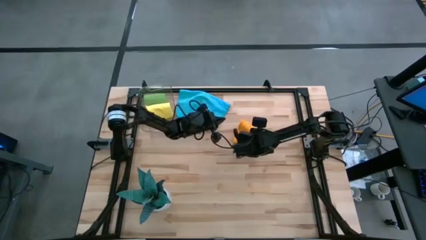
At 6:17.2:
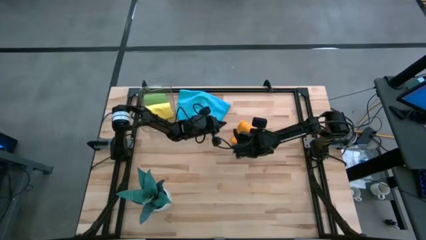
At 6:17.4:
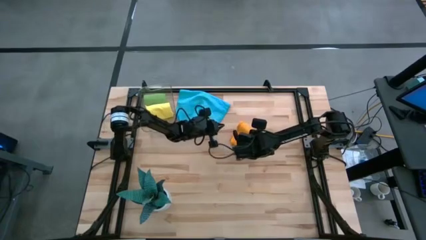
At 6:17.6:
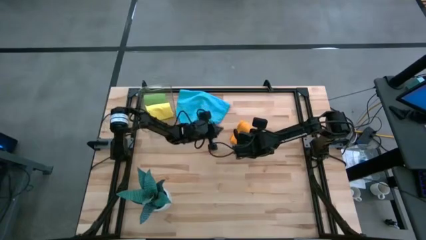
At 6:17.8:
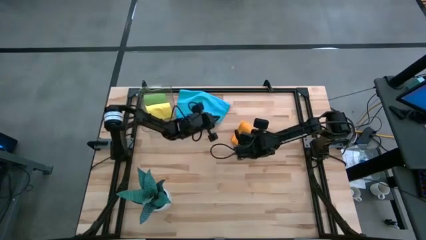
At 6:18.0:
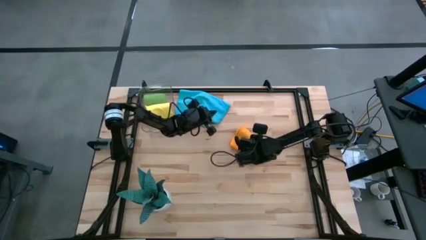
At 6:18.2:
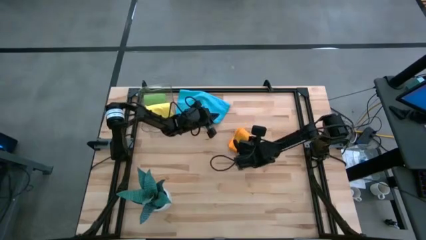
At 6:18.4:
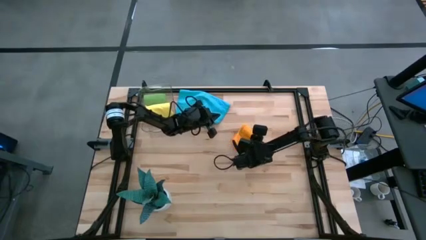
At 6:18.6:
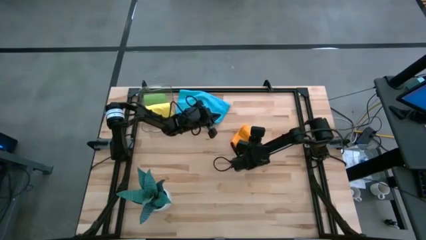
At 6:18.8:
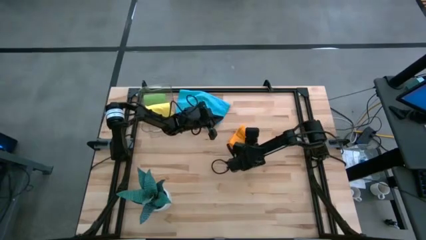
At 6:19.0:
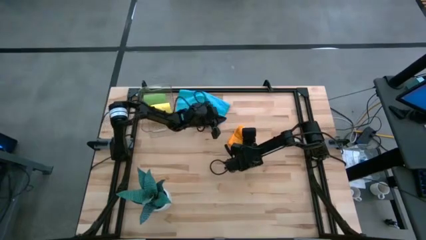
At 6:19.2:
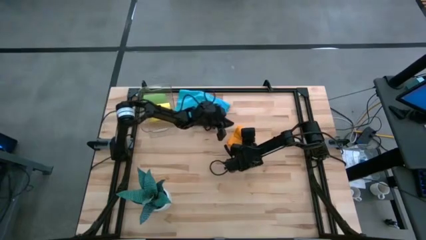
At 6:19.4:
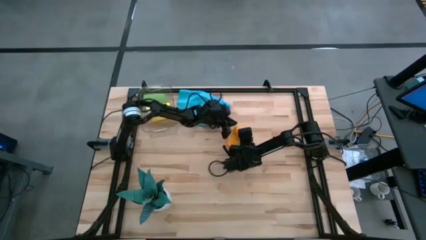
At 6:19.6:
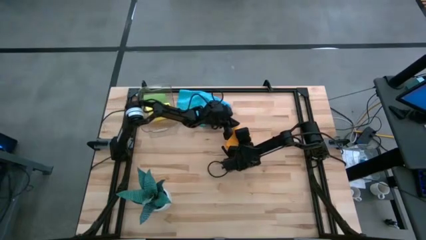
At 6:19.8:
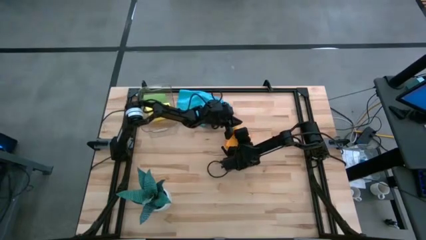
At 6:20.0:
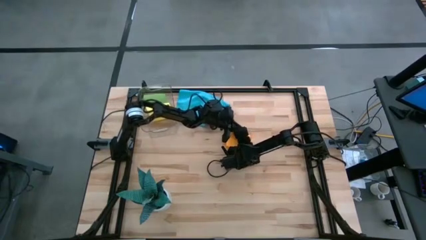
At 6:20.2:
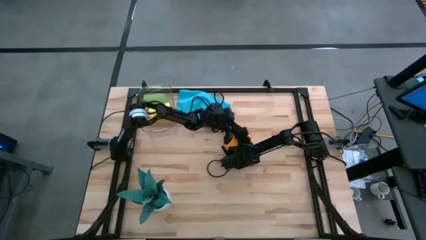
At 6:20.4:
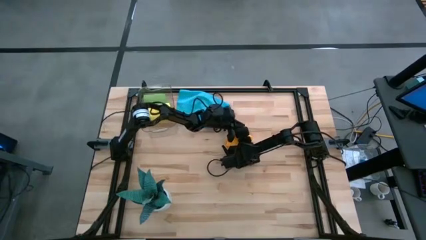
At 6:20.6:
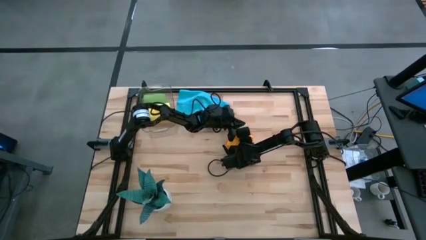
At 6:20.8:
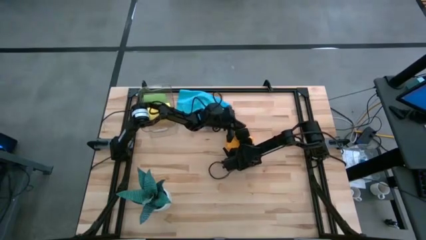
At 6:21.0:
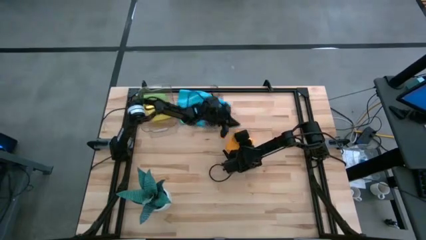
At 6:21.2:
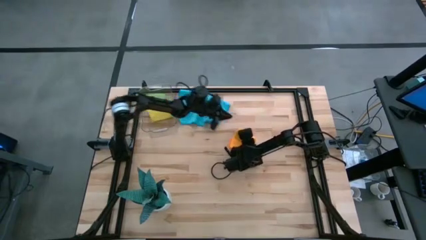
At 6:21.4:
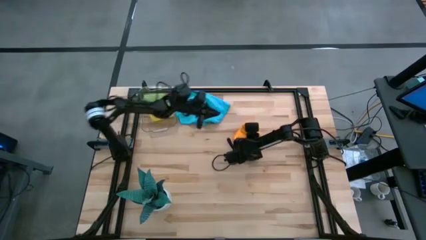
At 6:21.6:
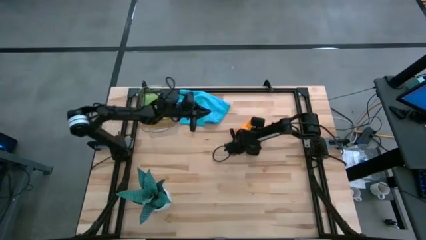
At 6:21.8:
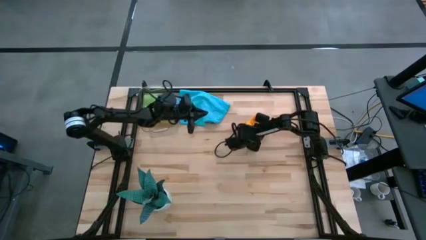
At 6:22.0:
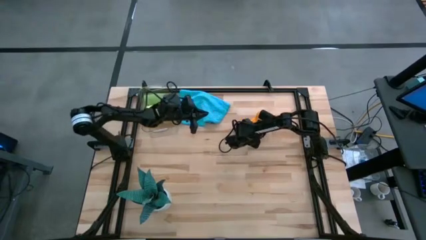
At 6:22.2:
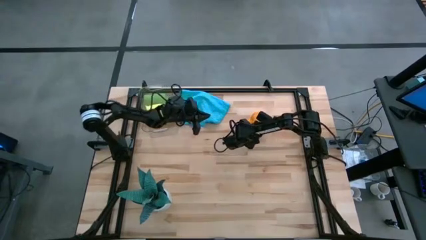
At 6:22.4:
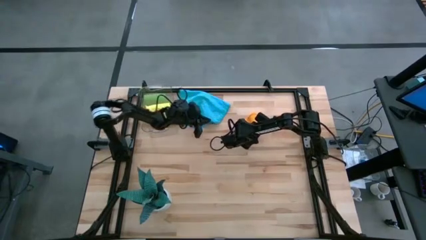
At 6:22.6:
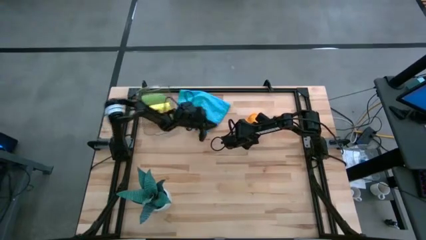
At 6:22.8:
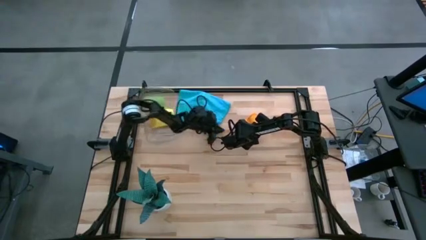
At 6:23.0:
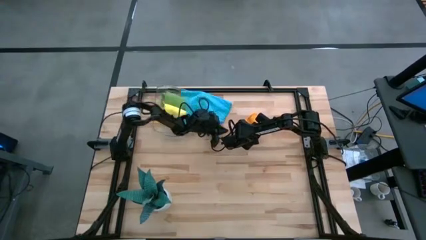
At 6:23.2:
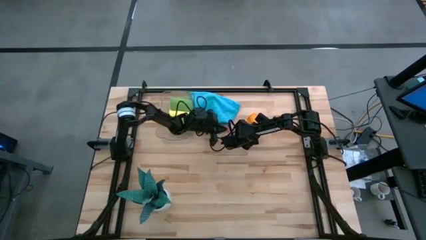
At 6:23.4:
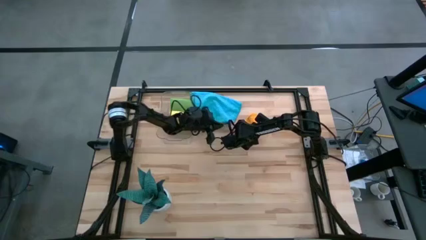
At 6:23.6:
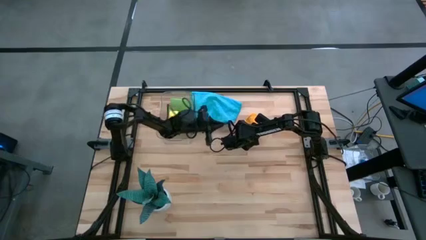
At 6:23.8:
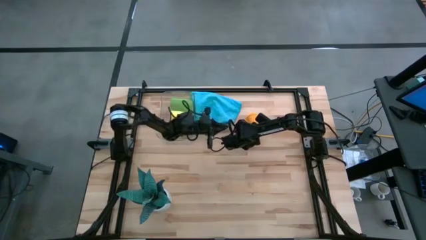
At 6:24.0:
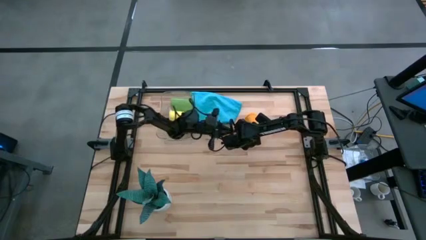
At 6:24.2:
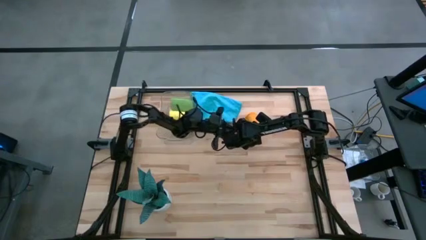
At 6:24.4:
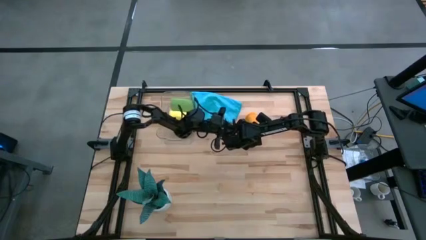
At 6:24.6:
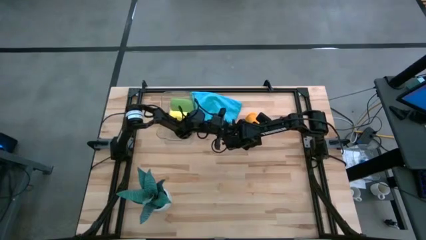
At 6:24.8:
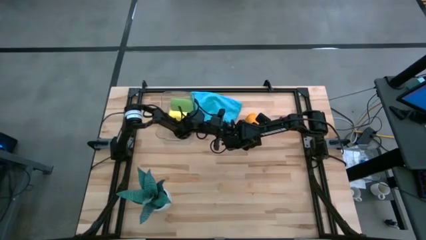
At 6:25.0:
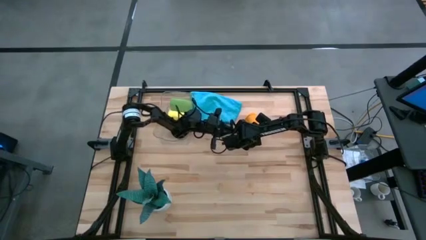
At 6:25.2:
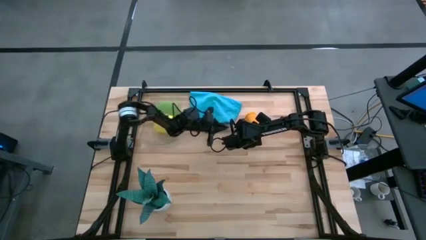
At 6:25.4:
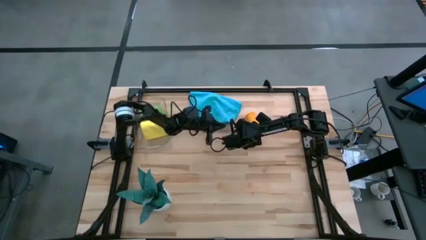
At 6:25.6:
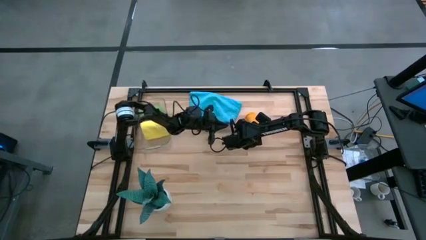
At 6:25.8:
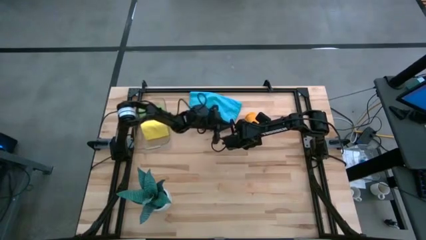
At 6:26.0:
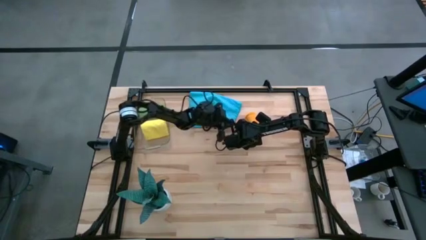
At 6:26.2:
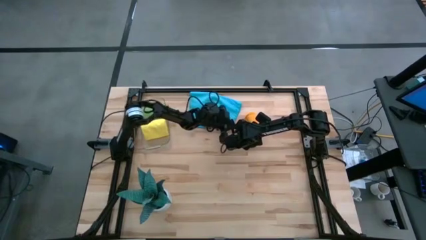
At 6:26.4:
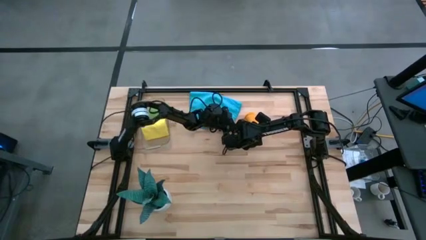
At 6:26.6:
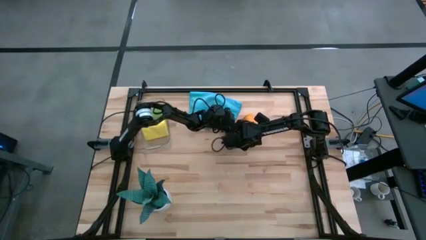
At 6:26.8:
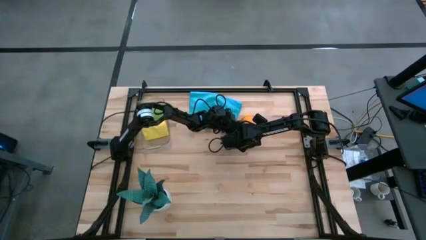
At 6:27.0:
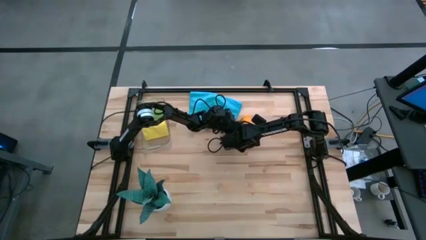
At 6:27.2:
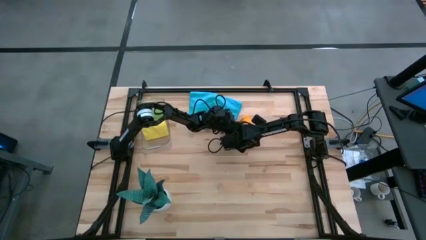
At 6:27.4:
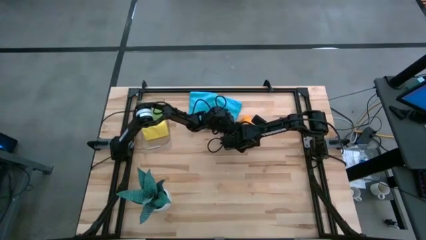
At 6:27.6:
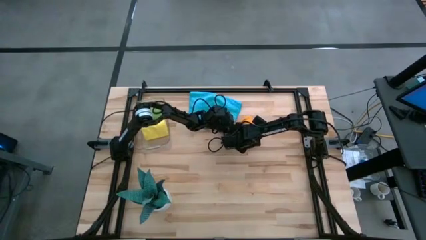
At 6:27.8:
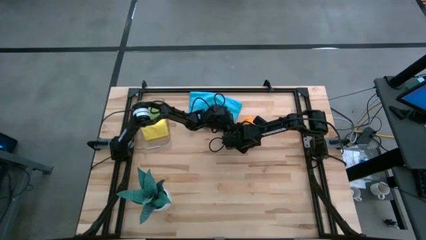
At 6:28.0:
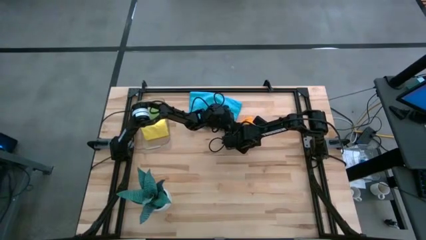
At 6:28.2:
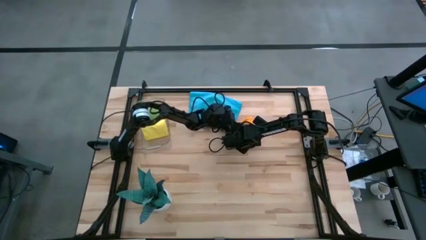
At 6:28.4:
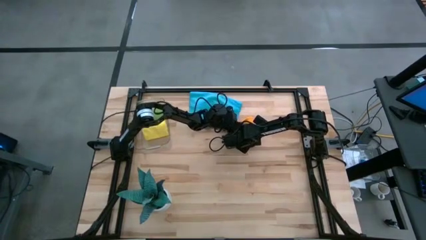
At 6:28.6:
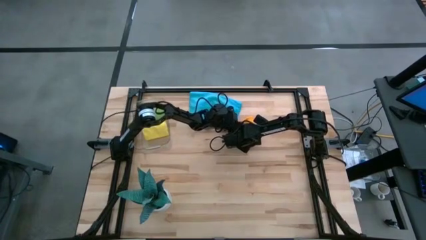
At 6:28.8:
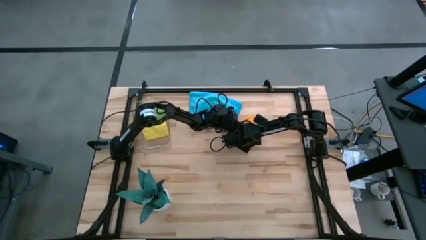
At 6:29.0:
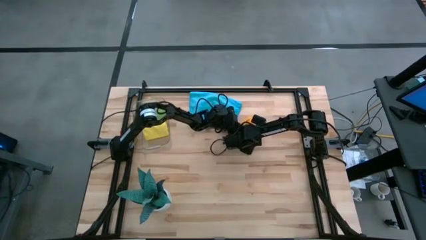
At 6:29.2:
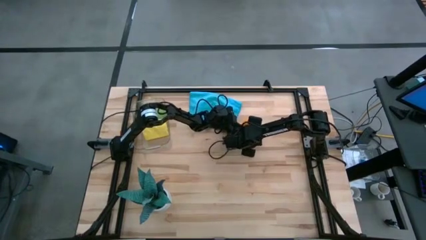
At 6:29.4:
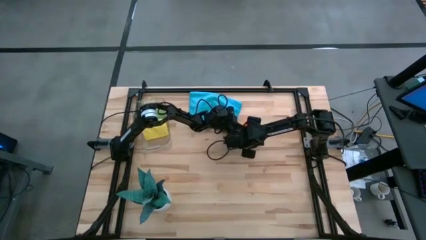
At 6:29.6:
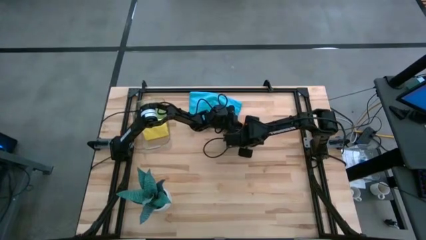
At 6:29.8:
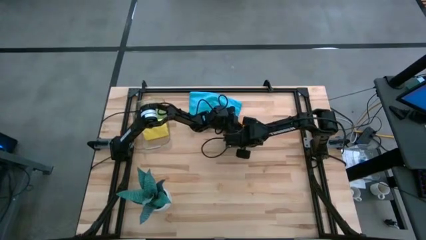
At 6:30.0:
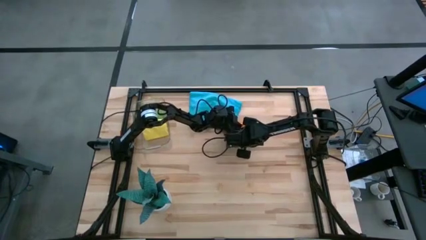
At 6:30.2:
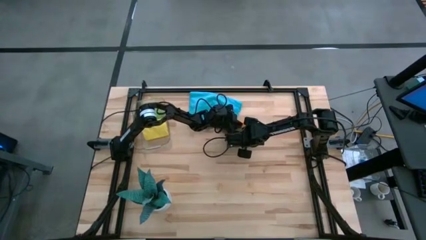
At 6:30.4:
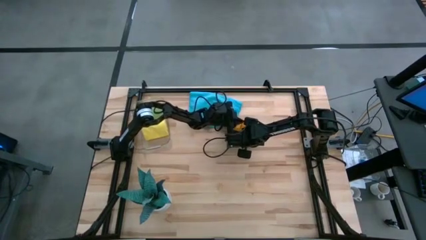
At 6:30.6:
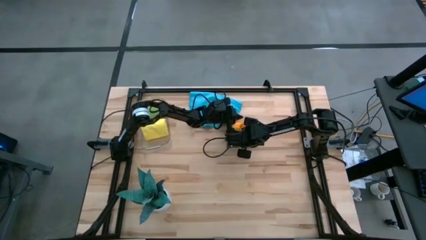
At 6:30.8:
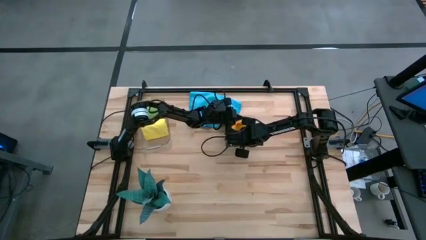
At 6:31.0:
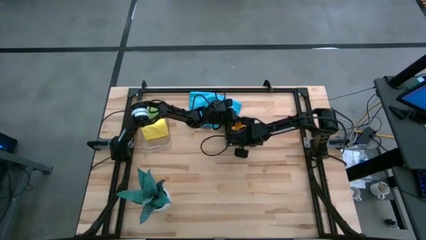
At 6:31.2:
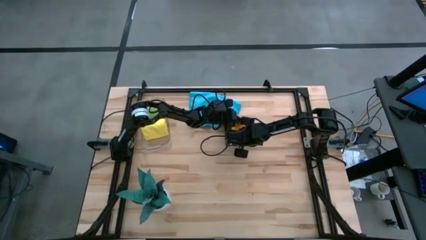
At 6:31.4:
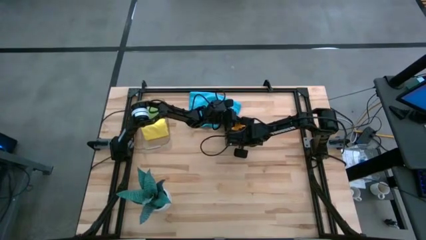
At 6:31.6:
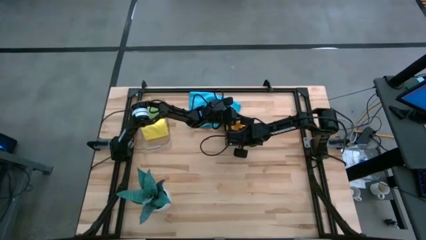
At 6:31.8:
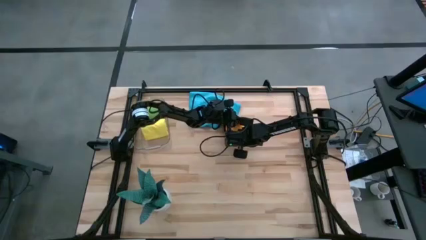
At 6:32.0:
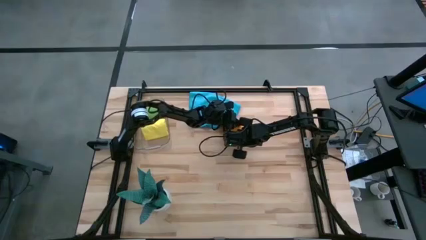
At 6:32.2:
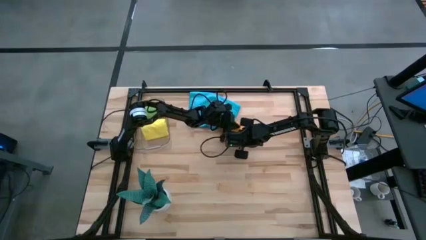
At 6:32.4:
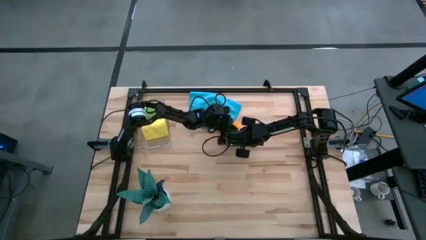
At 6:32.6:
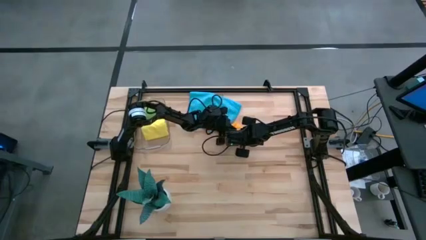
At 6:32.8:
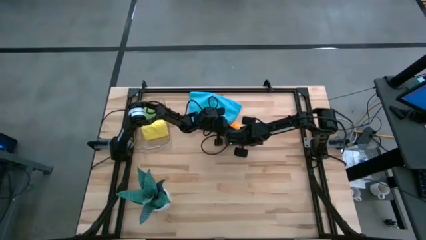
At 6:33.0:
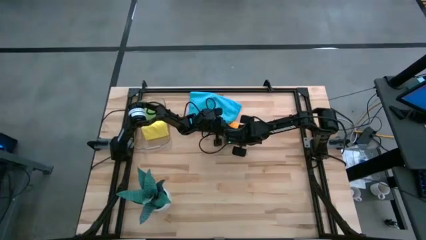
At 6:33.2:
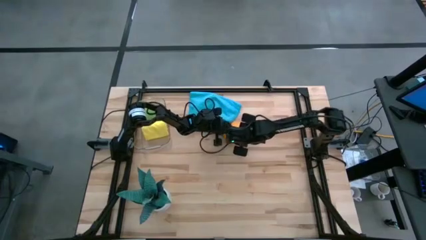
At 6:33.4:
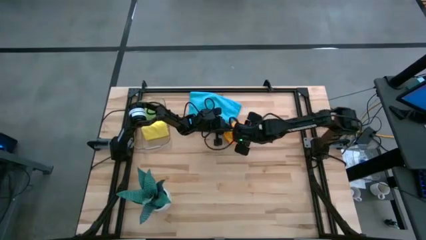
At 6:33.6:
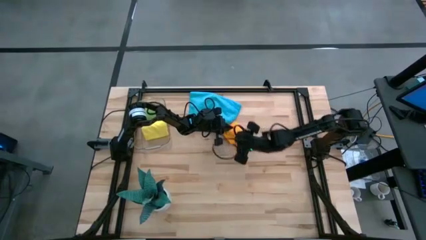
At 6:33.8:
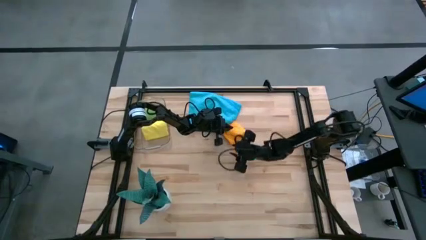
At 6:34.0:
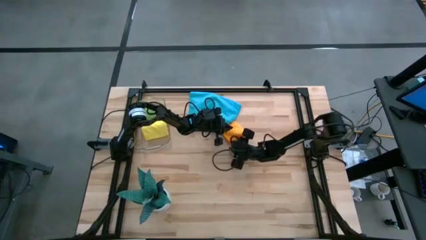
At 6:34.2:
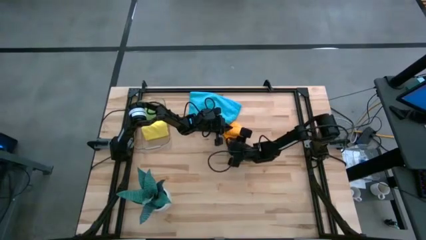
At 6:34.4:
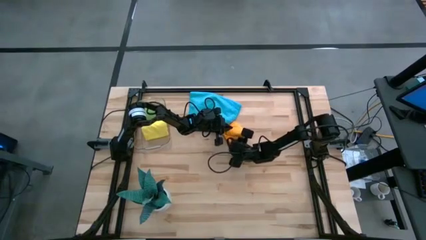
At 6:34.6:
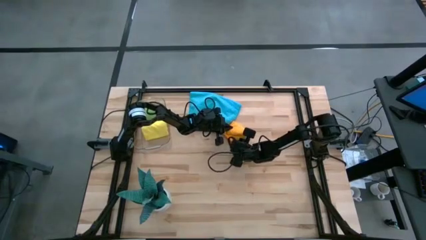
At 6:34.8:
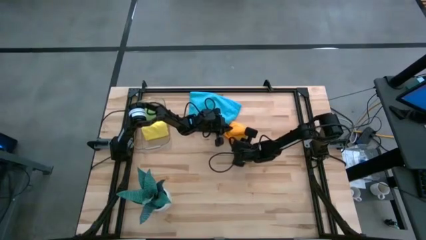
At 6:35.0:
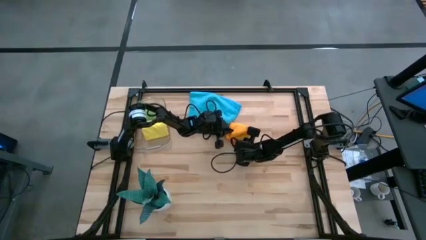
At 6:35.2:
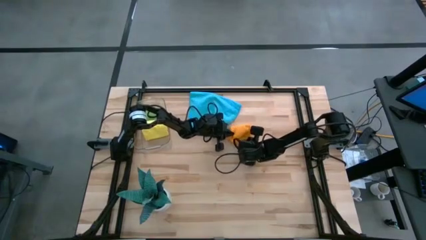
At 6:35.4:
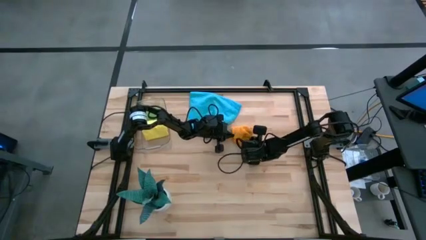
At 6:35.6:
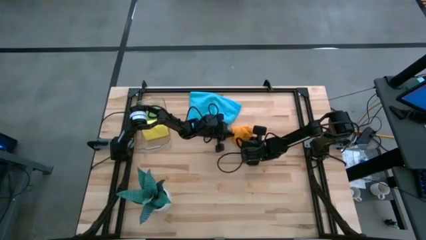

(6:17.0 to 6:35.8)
Task: Roll microfiber towels into tight, uniform cylinder then place into a basket
Roll the orange microfiber towel
